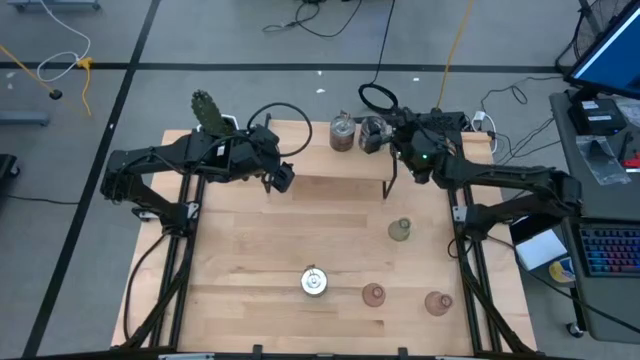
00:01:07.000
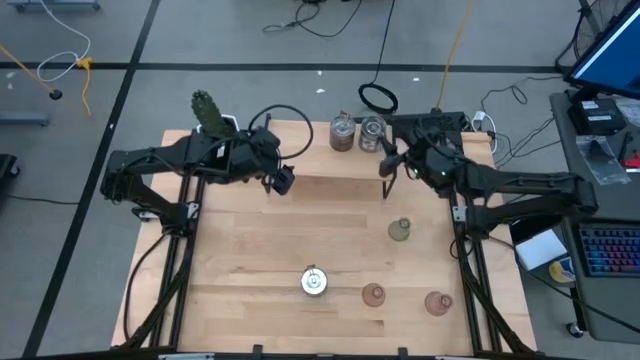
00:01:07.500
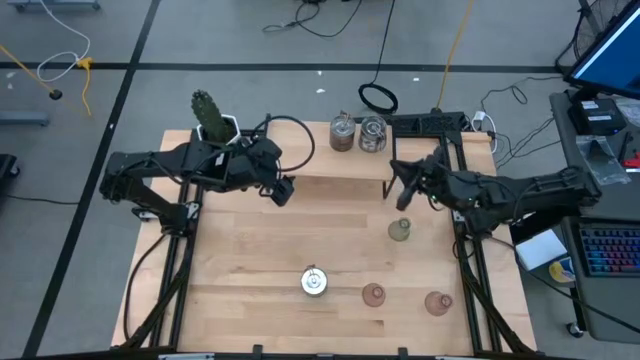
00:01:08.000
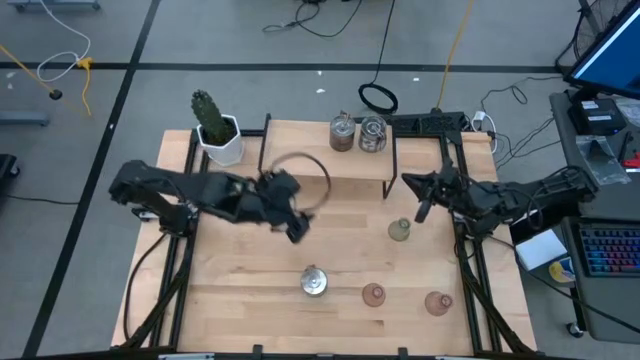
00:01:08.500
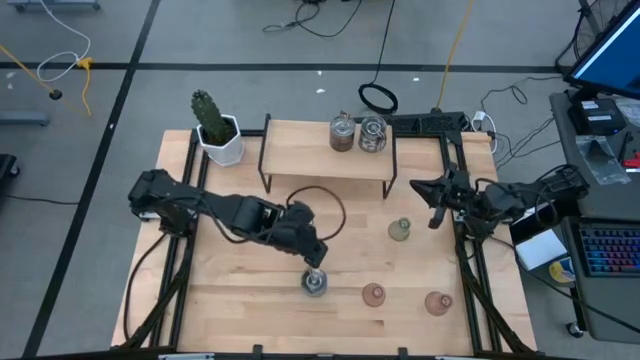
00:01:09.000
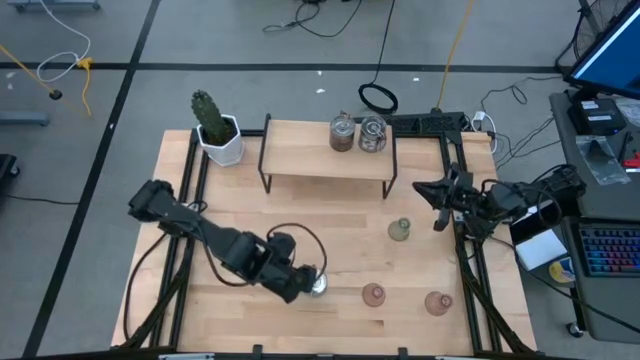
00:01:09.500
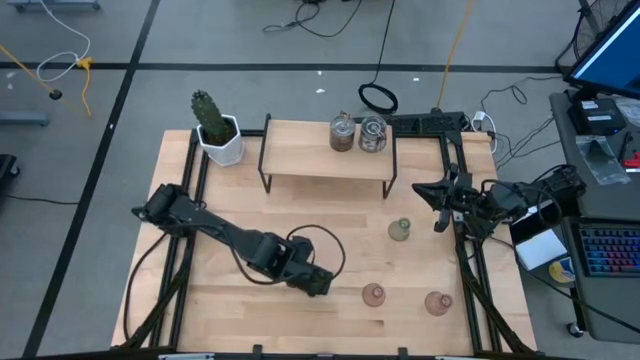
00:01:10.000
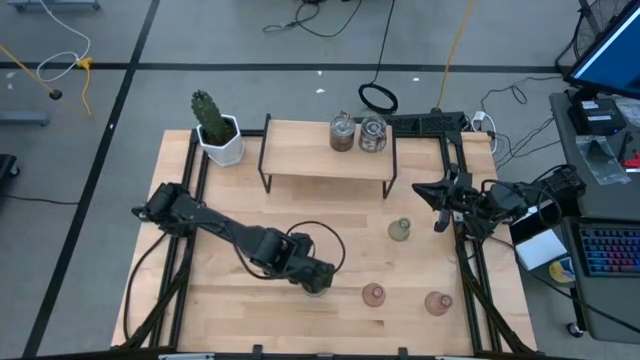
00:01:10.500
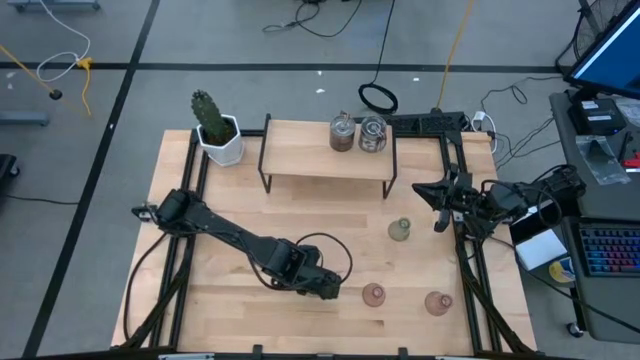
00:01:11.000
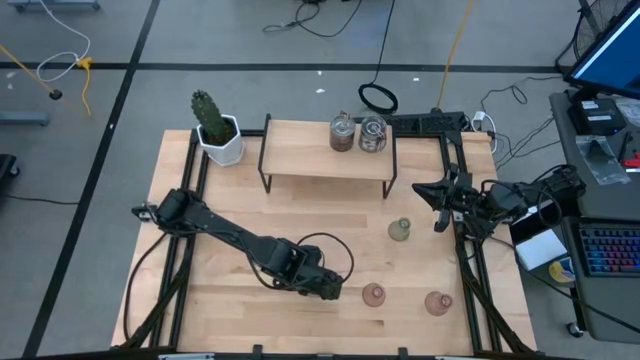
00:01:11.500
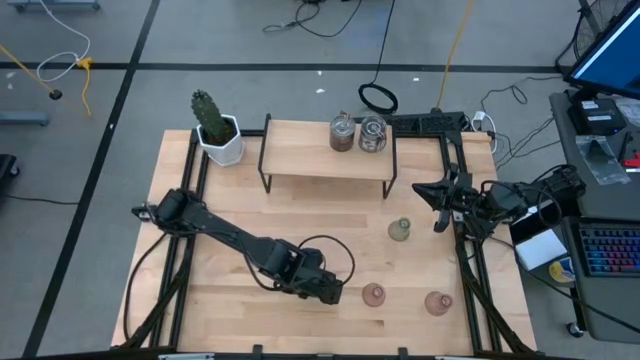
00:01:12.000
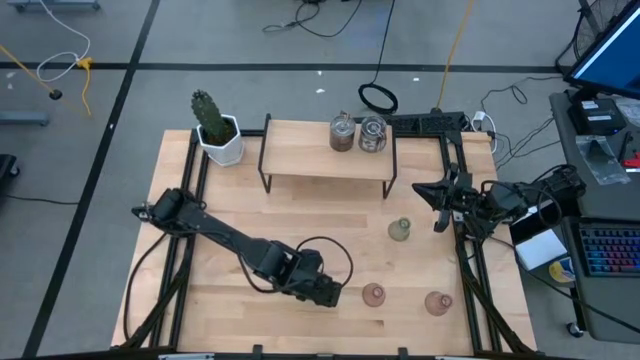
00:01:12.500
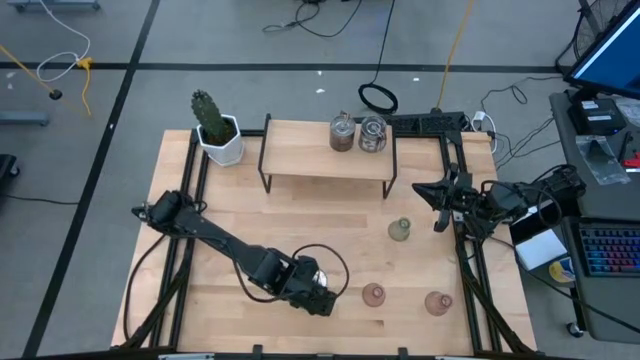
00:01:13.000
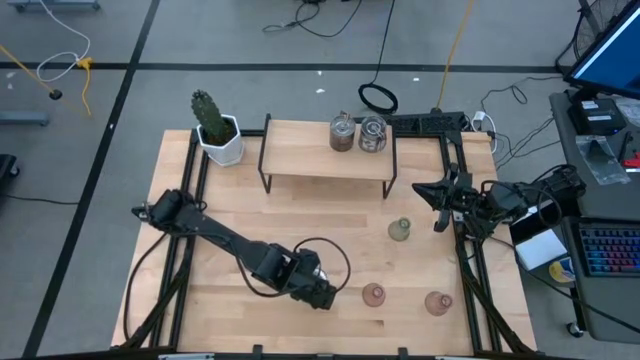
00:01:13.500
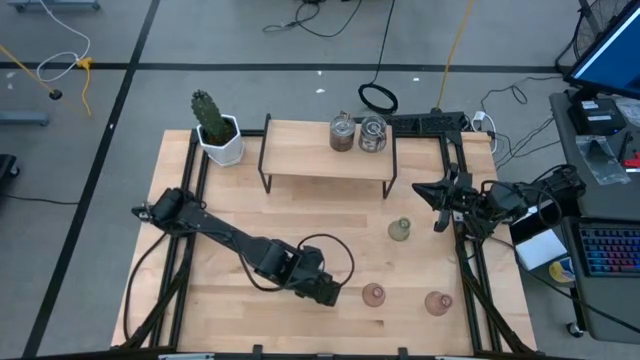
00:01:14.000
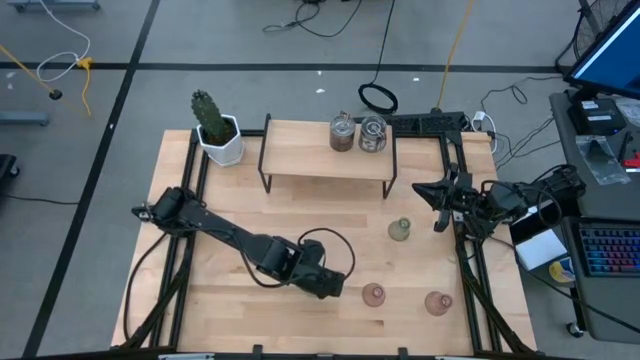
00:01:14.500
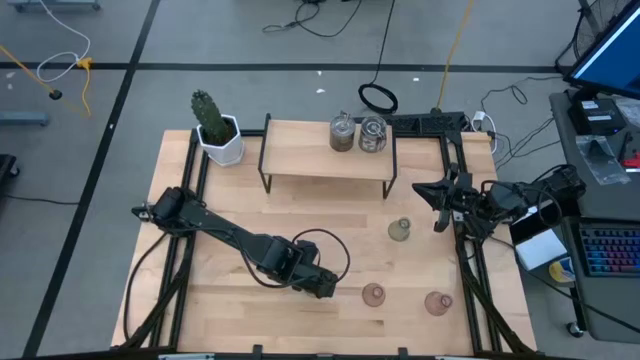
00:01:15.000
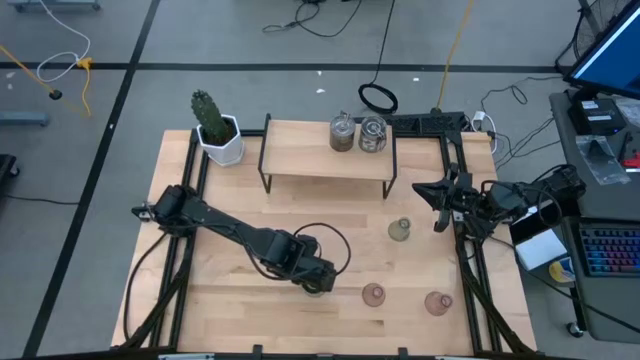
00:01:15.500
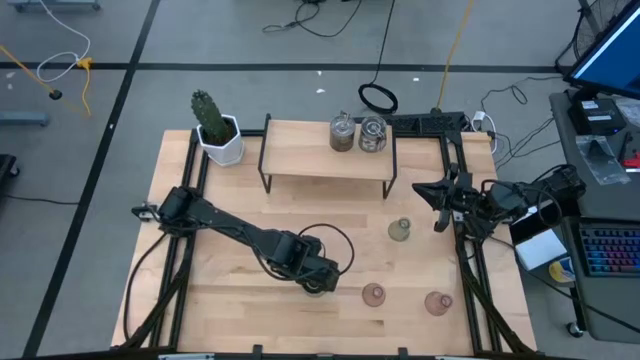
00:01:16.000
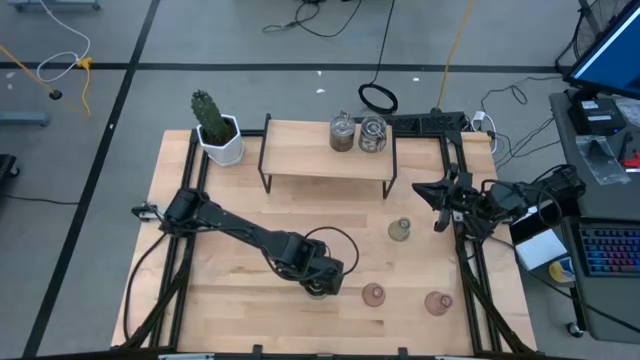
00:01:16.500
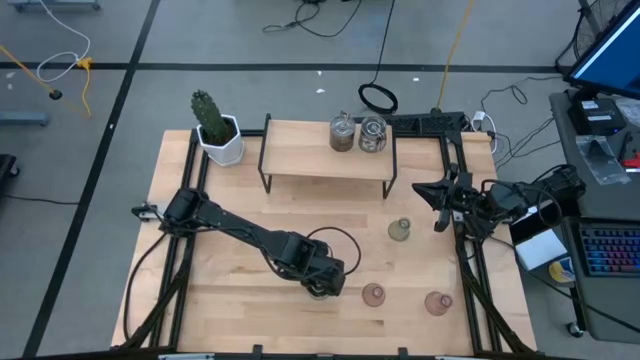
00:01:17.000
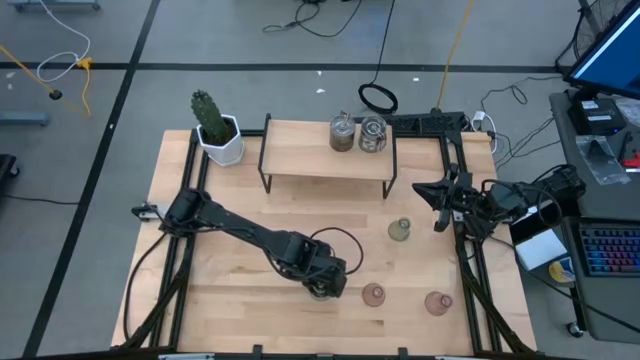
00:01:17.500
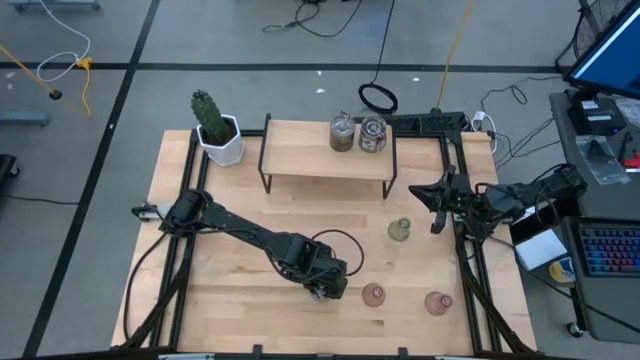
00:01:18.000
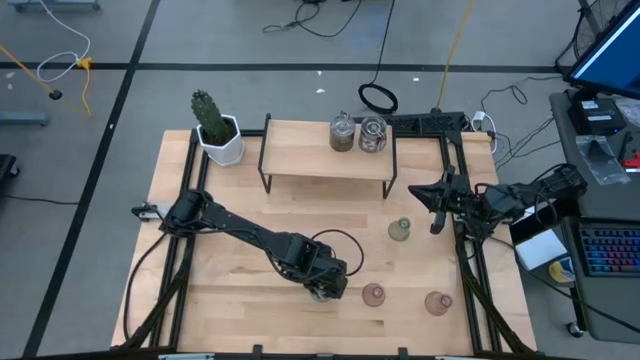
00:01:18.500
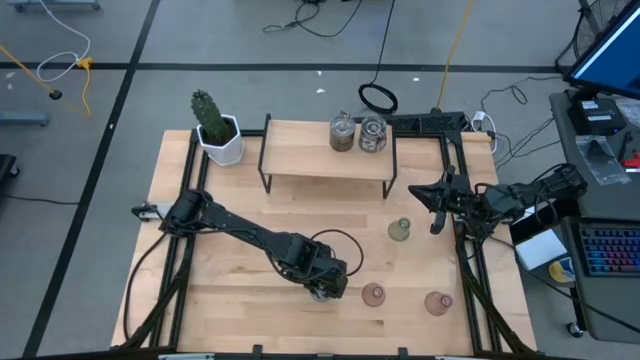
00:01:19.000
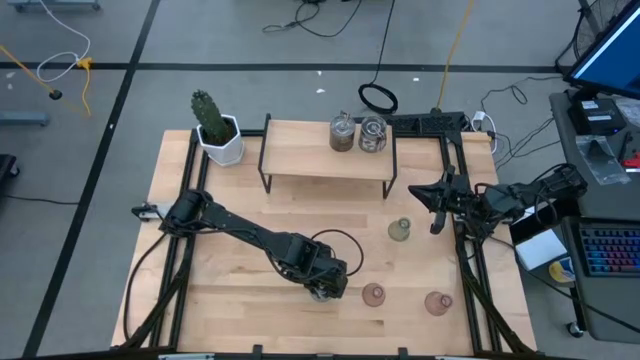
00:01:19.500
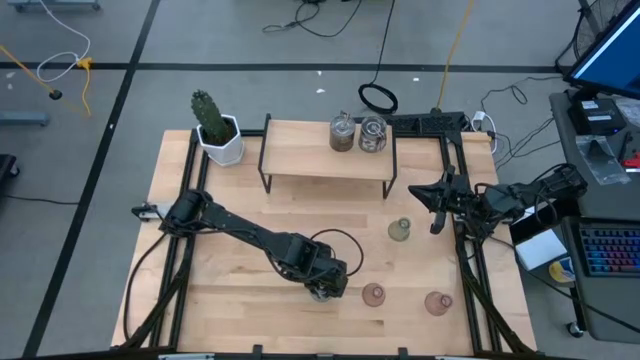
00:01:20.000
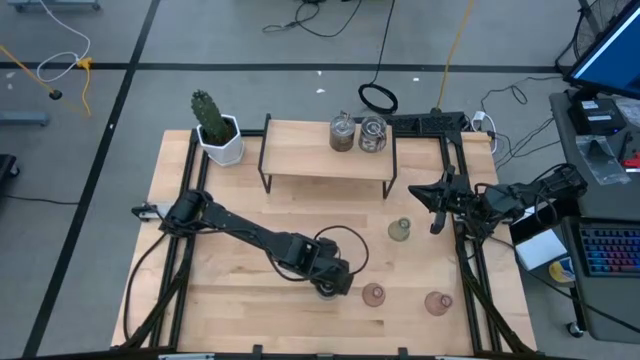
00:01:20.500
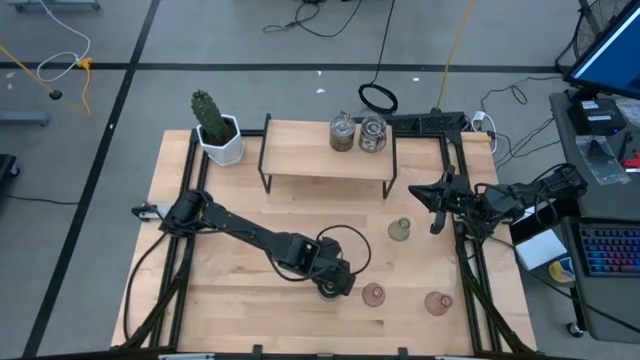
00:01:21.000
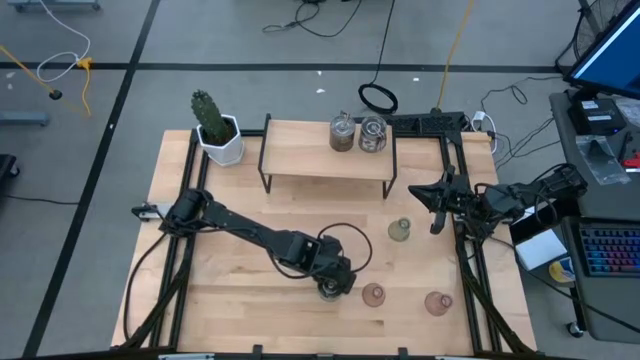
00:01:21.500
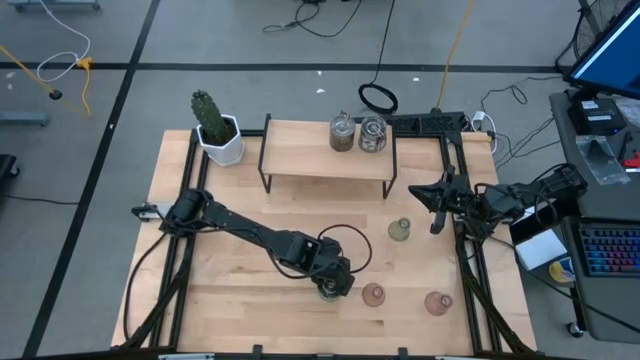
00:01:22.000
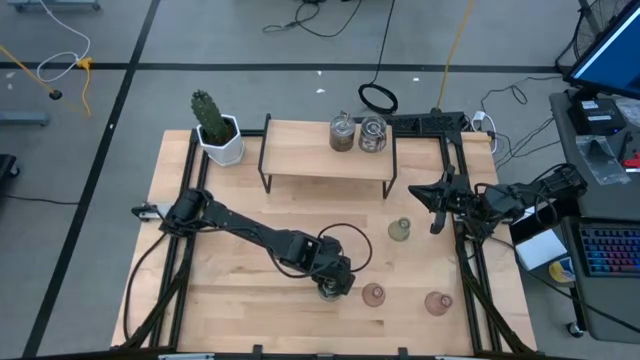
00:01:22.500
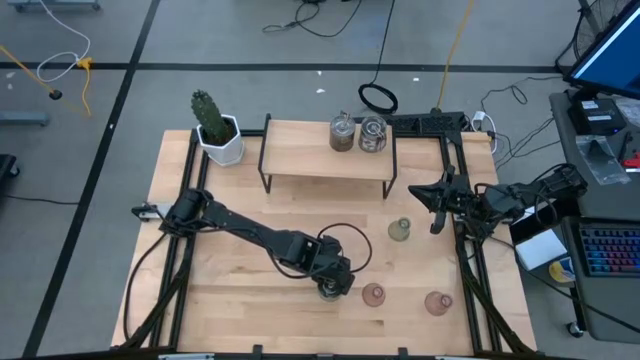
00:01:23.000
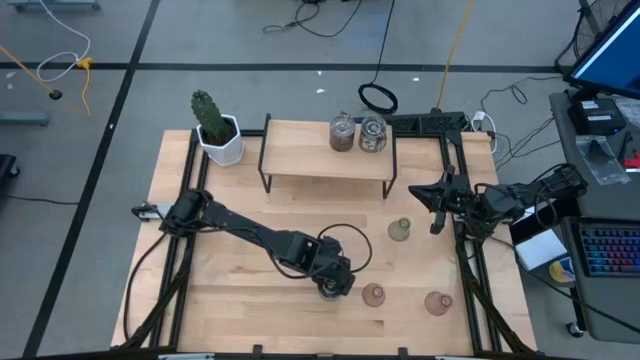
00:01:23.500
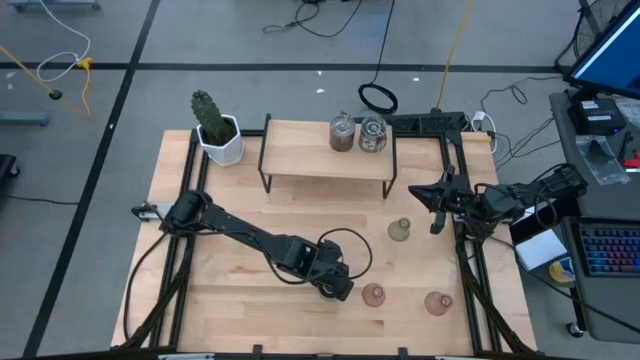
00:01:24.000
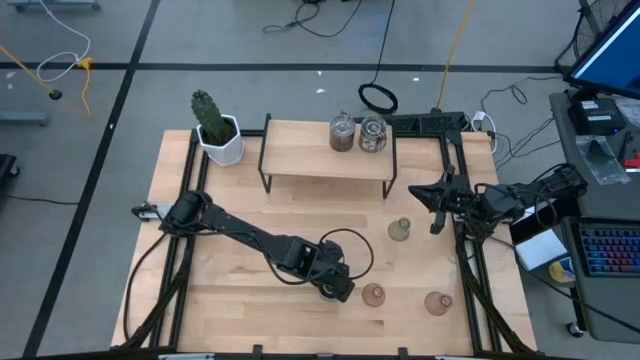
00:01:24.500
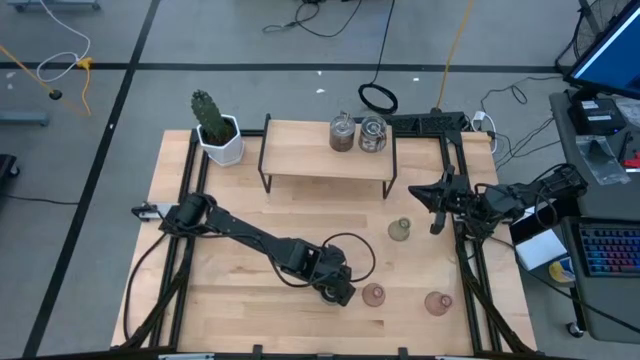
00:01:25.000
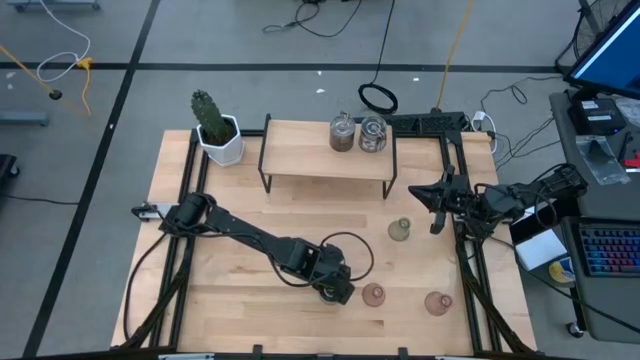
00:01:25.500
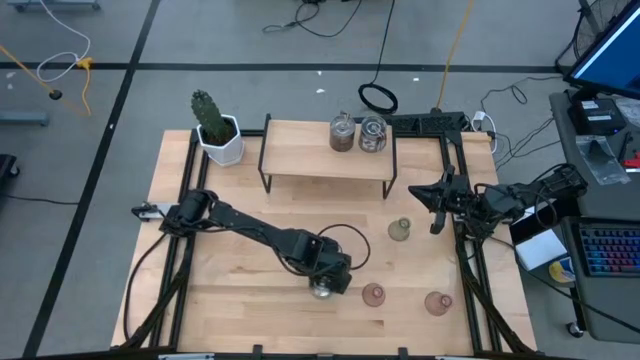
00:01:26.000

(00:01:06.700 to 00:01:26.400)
Task: Pick & Place candle stick holders
Put the silver scented candle on the shelf

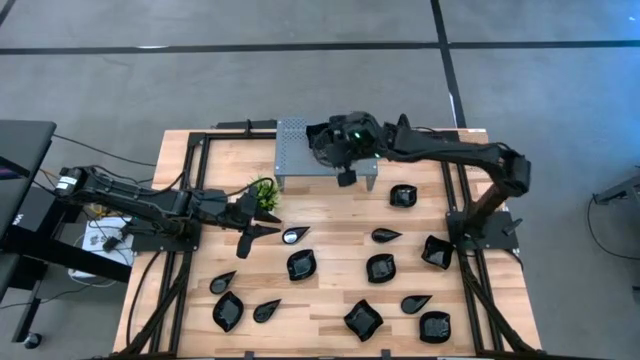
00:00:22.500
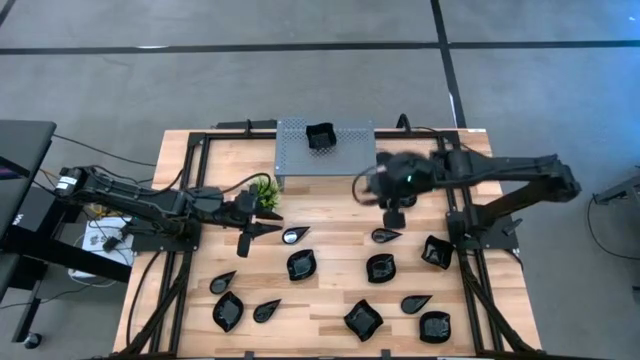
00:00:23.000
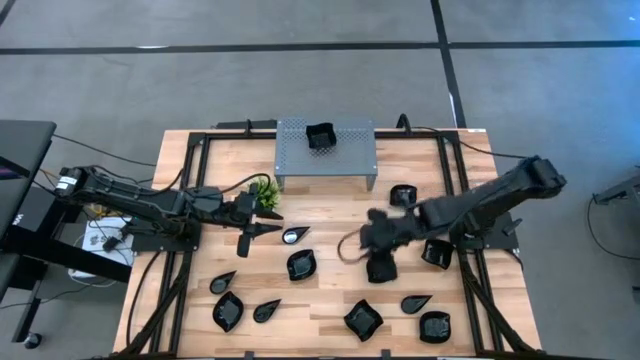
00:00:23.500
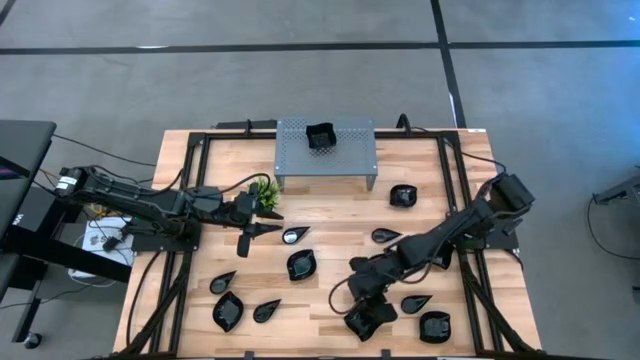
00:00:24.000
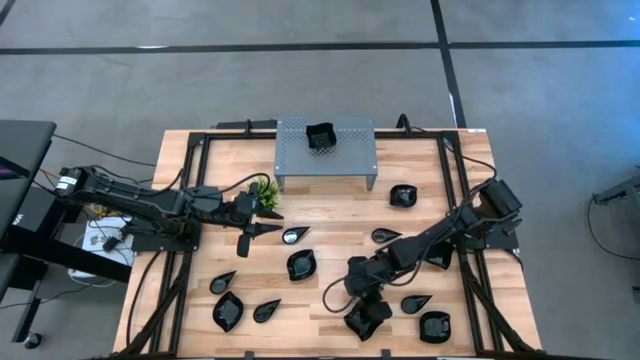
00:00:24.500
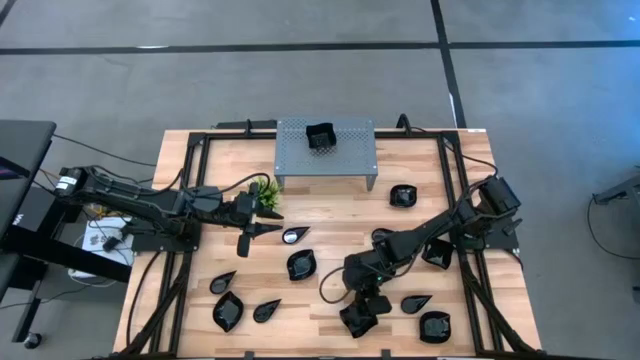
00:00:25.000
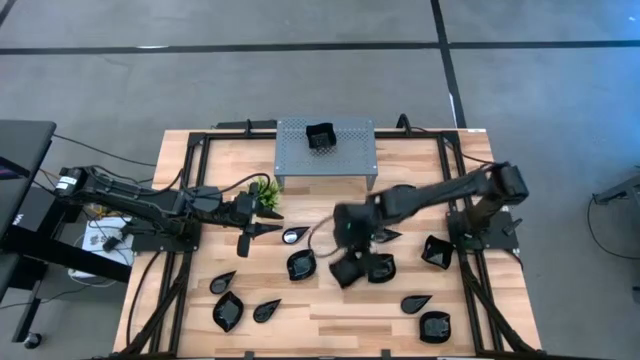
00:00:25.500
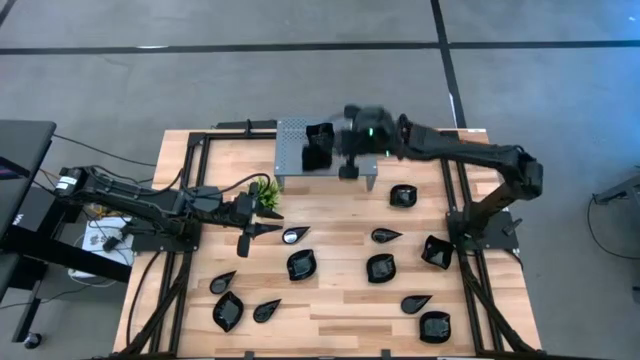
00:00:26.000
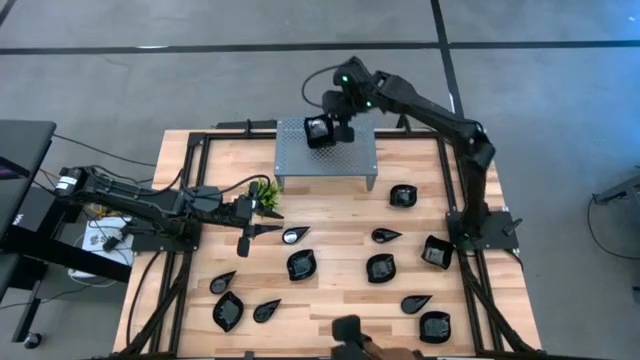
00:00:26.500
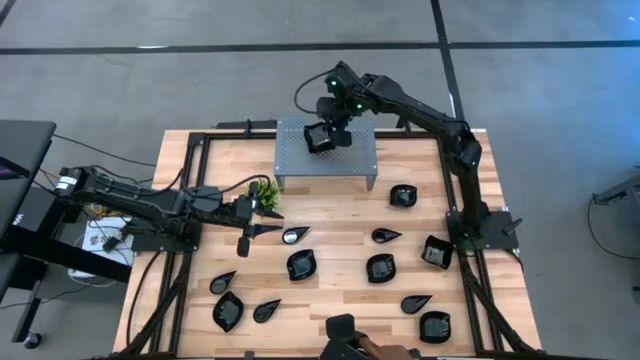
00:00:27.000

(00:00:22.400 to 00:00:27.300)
Task: Pick & Place Mini shaped plates
Stack the black distorted square plate on top of the black distorted square plate on the shelf
